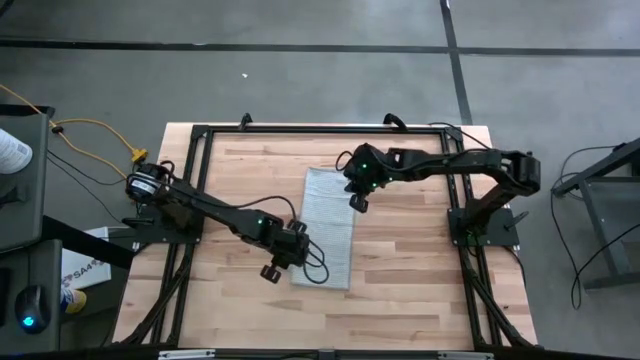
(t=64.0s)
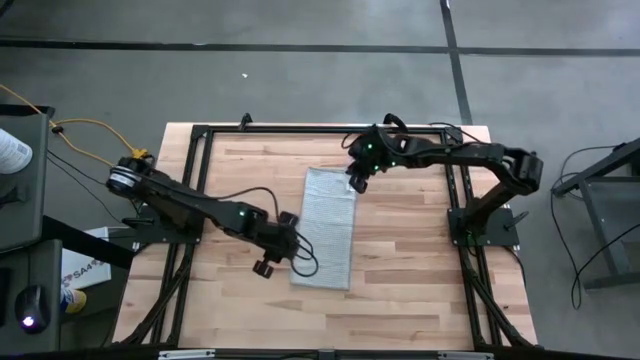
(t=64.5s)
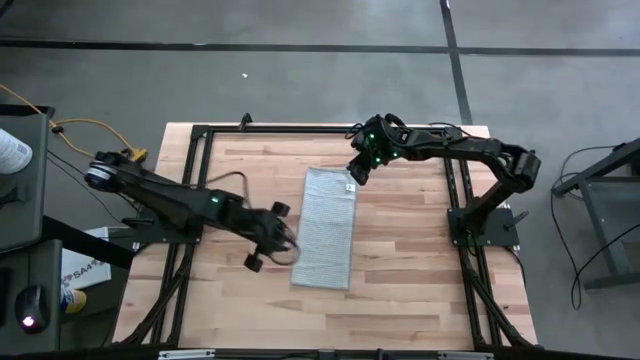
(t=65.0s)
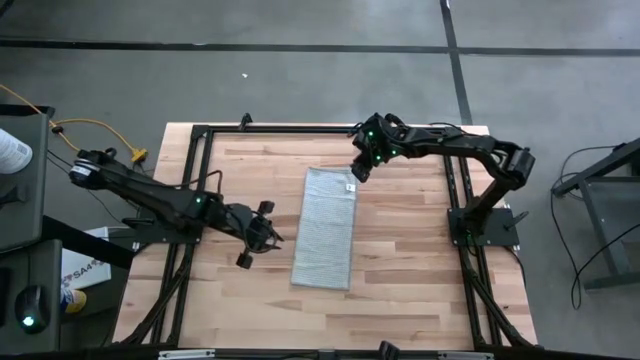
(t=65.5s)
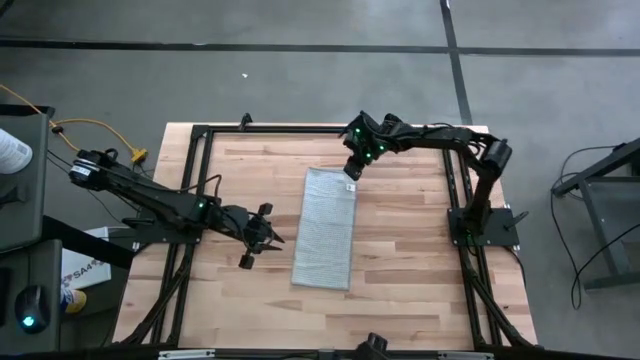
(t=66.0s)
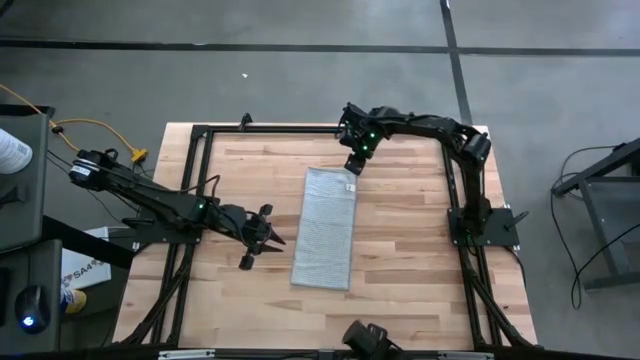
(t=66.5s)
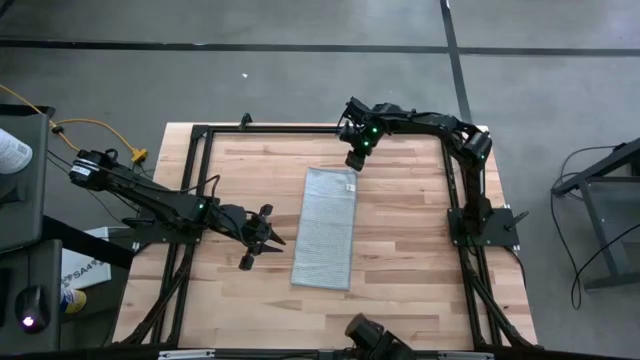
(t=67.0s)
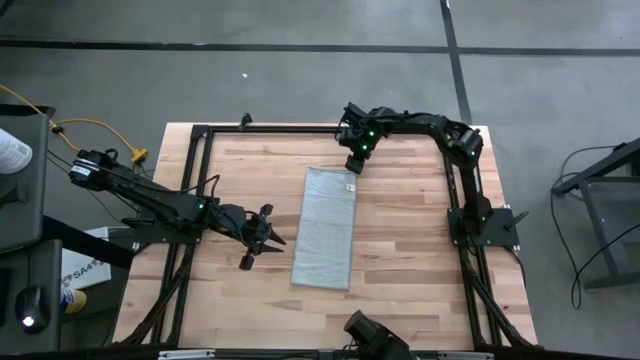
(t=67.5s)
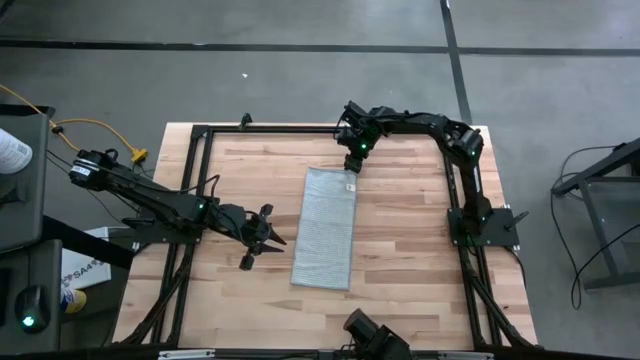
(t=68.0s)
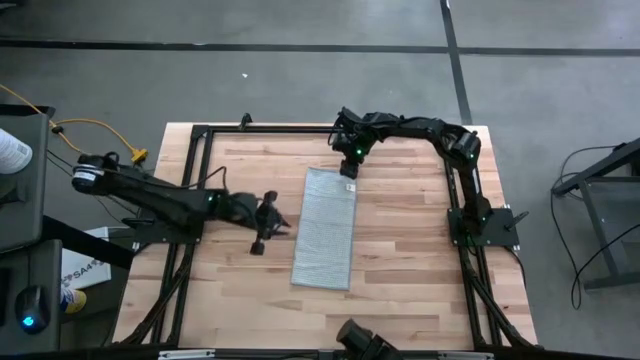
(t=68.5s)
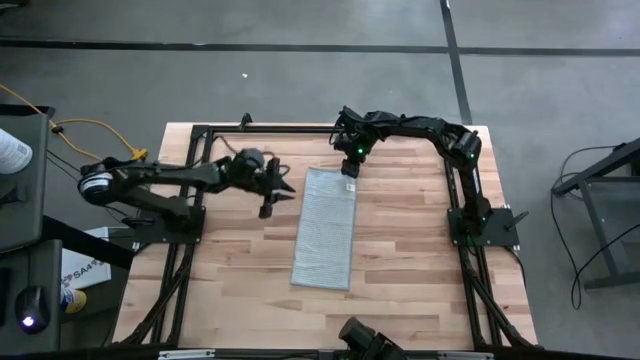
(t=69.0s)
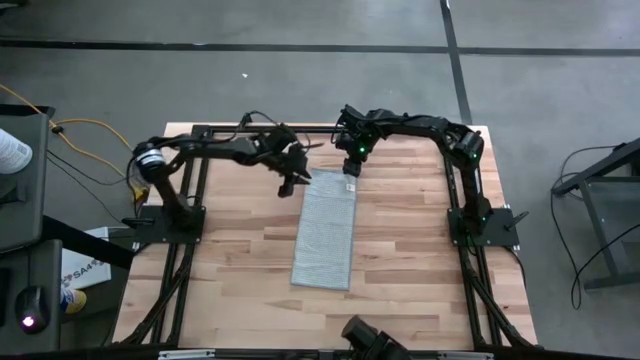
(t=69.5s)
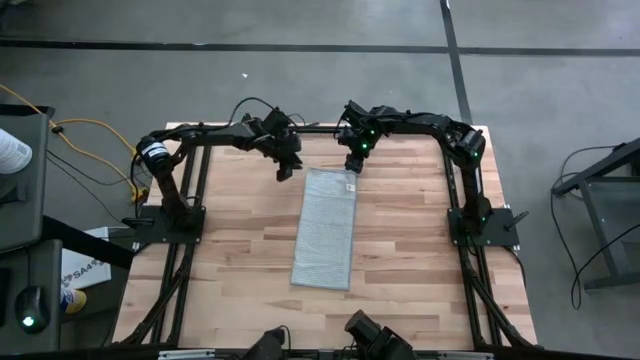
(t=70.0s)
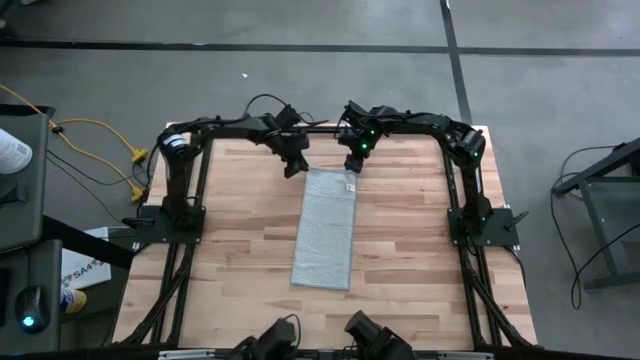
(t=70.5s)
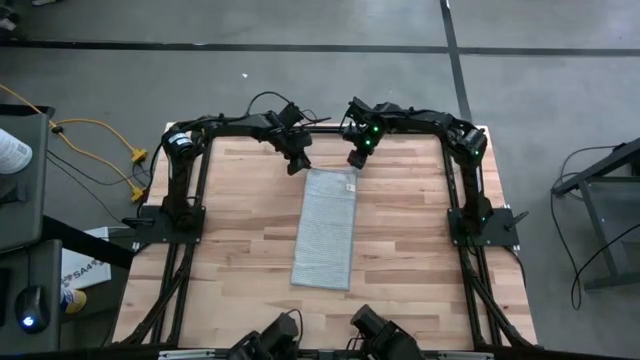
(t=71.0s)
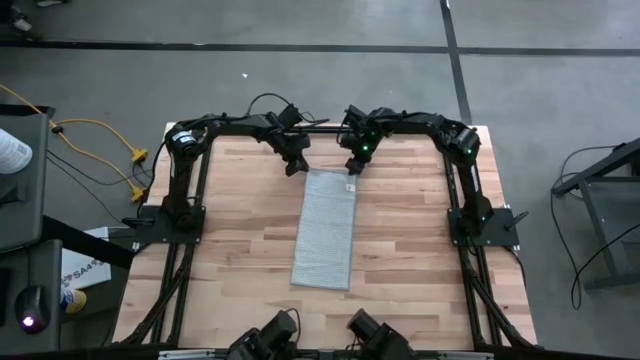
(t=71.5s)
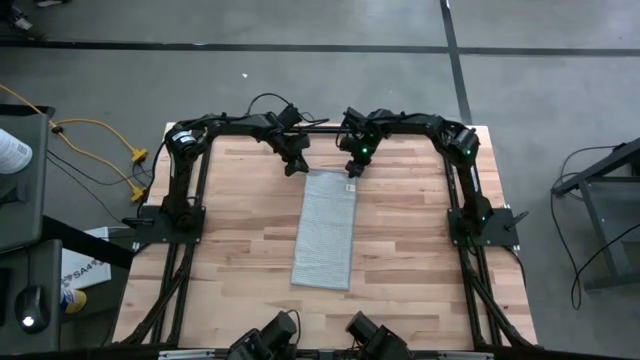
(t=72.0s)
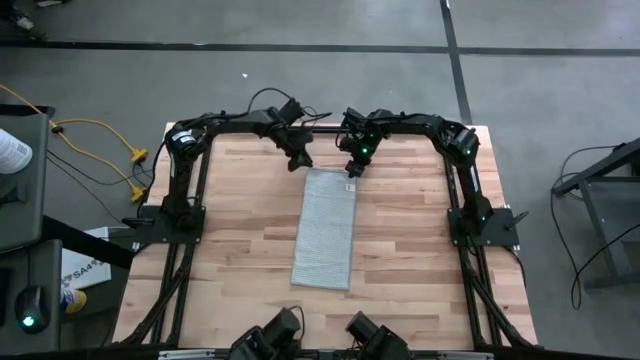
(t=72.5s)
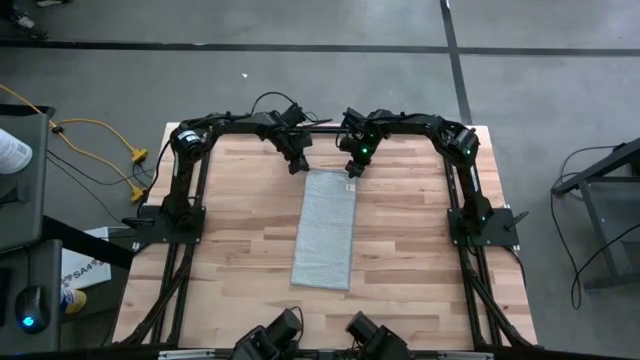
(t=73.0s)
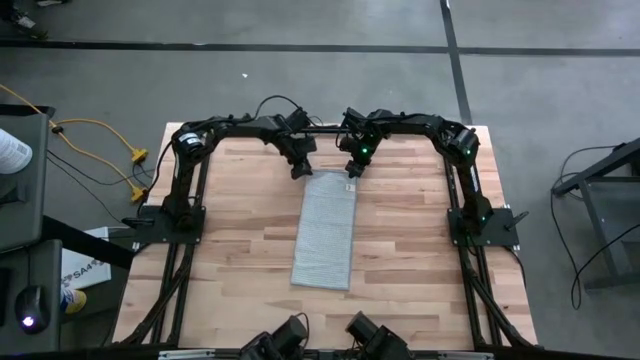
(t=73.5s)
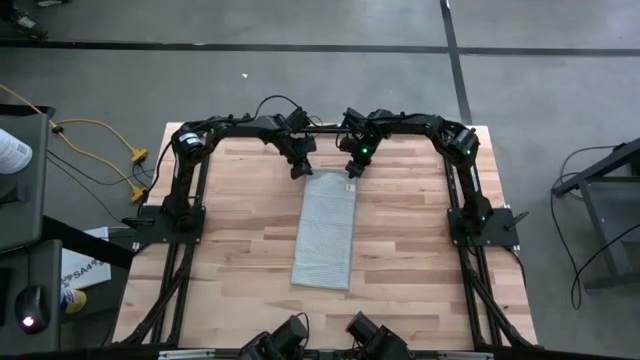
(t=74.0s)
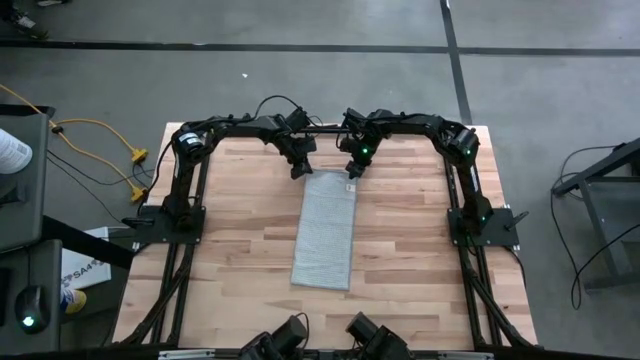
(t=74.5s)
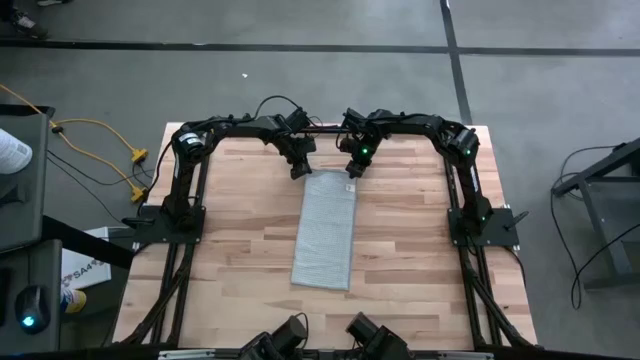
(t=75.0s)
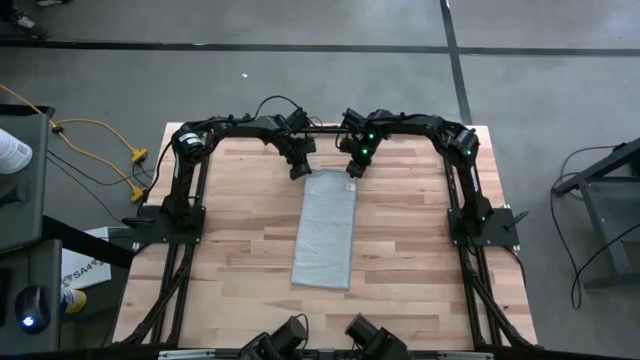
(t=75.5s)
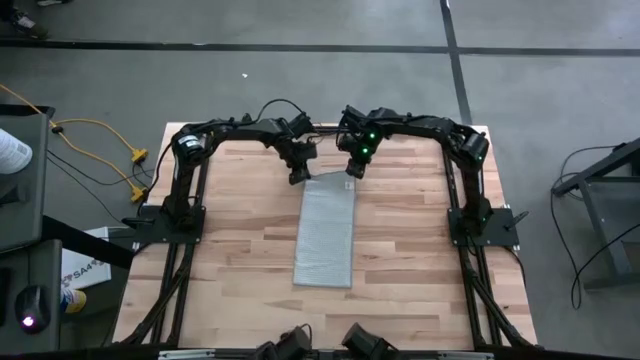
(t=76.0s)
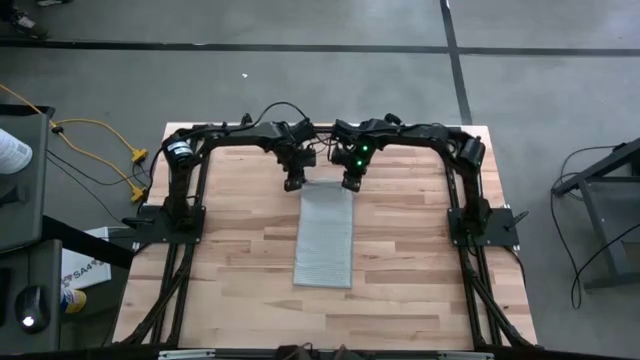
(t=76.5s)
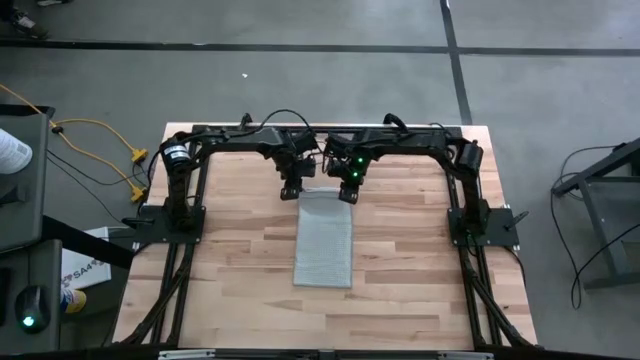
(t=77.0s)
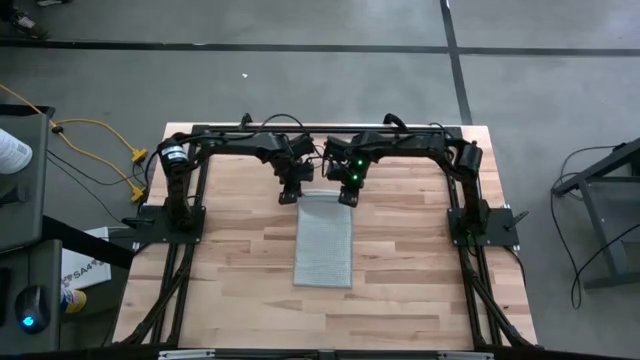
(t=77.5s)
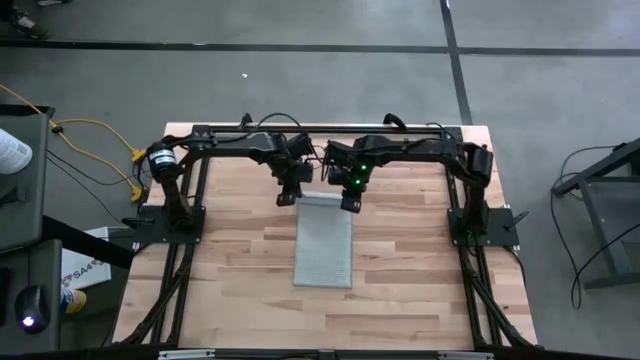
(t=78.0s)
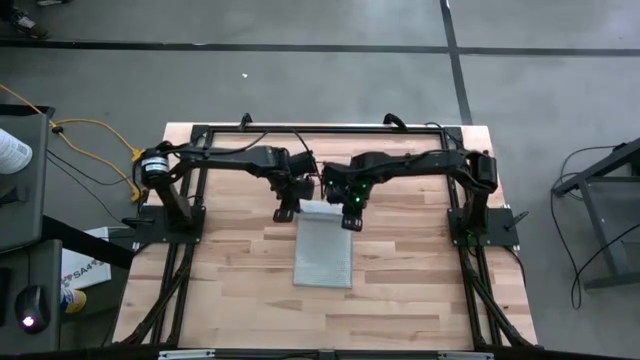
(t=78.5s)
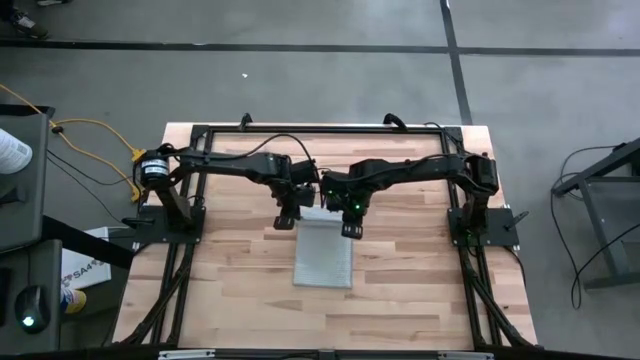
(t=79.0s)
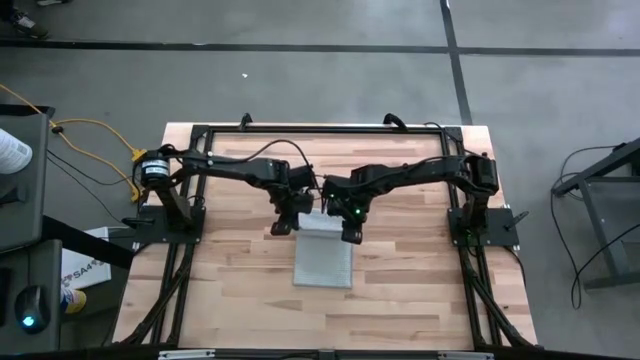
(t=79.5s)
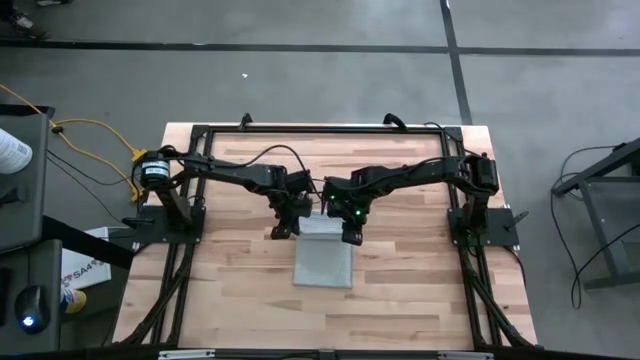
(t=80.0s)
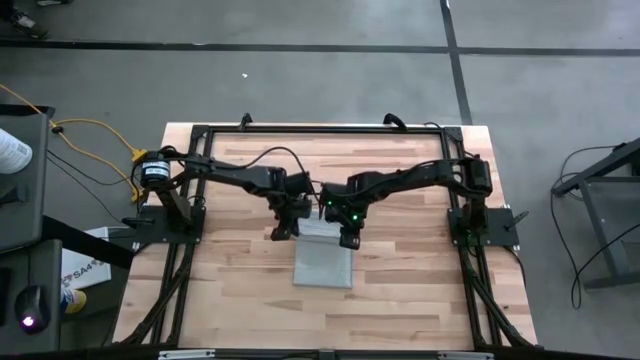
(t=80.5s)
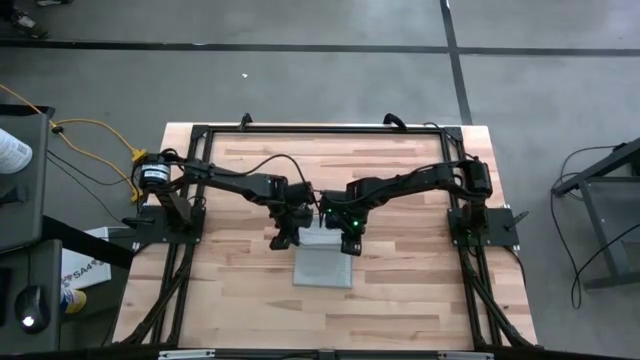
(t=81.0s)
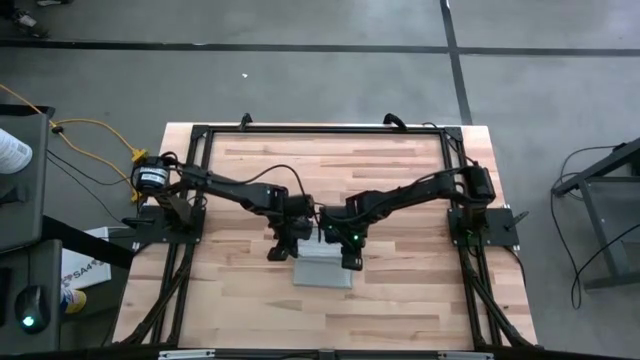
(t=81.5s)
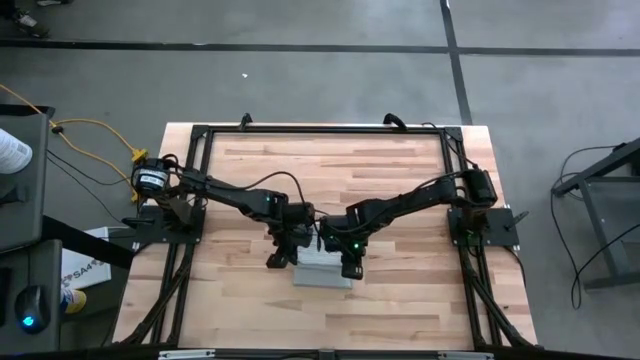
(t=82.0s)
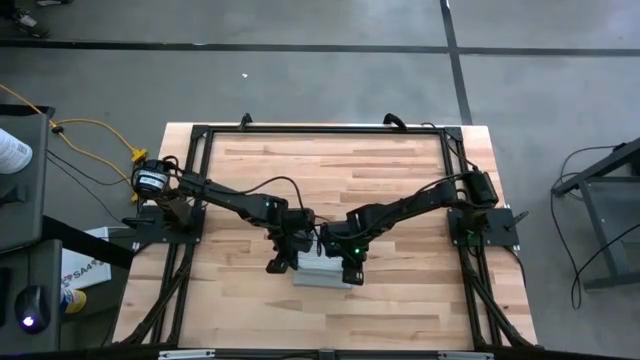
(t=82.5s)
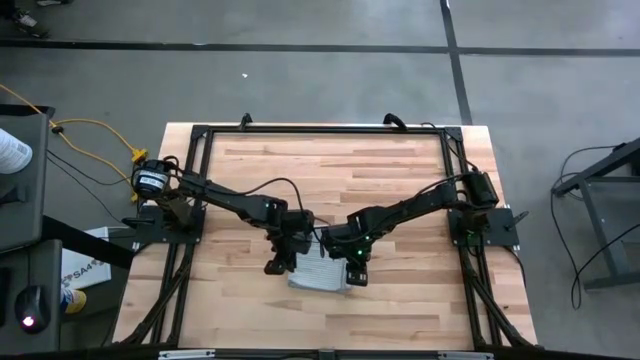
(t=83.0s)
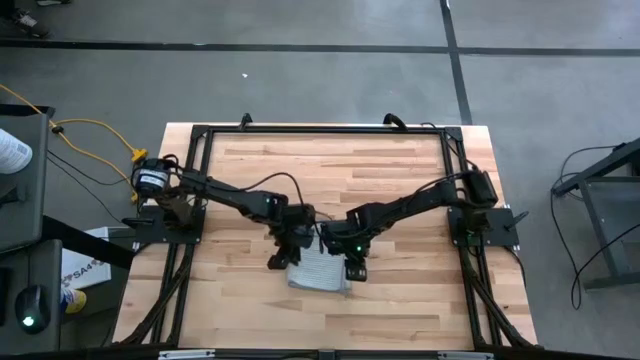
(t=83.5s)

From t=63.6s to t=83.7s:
Task: Fold microfiber towels
Fold the gray towel
